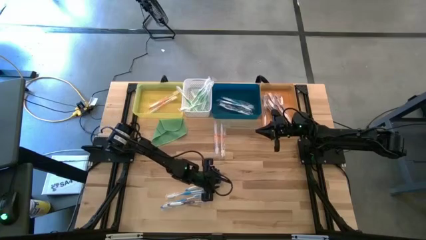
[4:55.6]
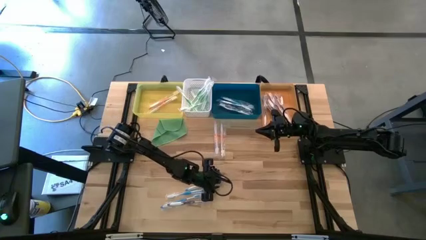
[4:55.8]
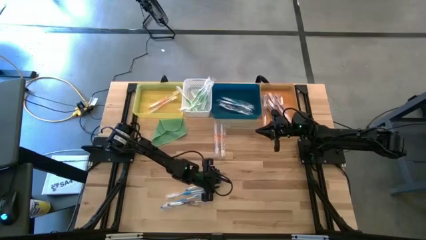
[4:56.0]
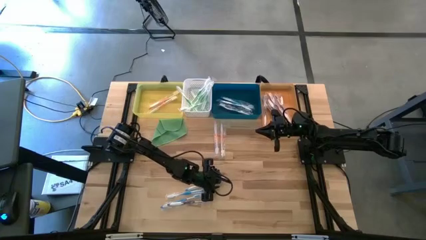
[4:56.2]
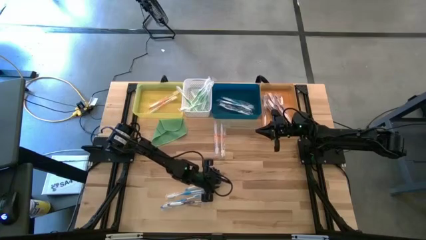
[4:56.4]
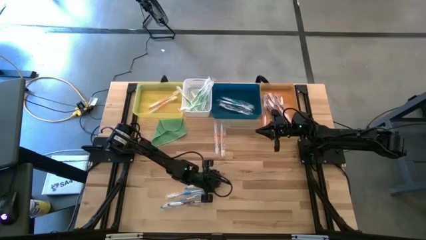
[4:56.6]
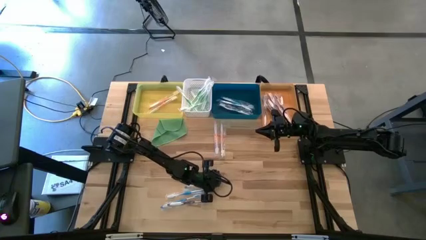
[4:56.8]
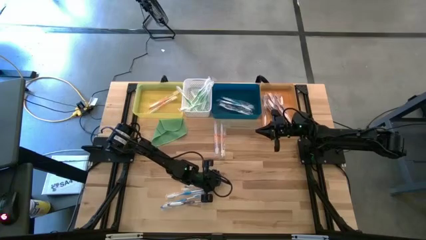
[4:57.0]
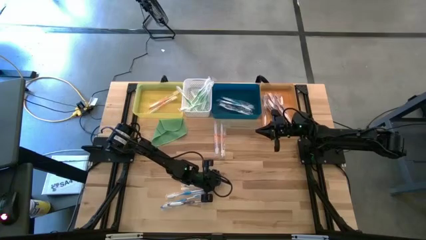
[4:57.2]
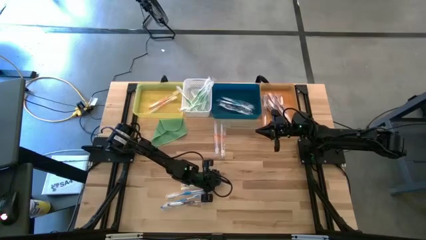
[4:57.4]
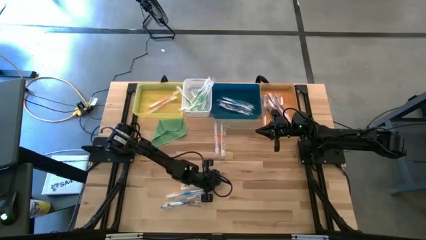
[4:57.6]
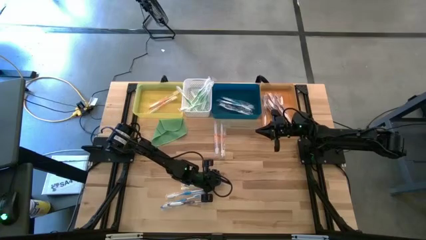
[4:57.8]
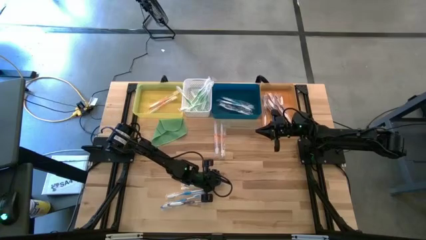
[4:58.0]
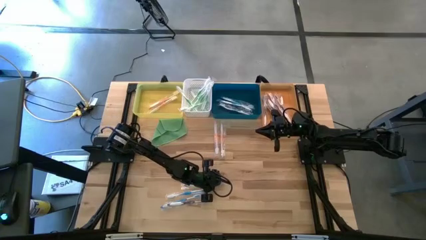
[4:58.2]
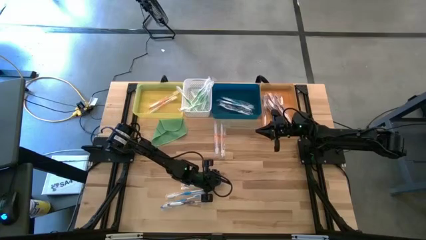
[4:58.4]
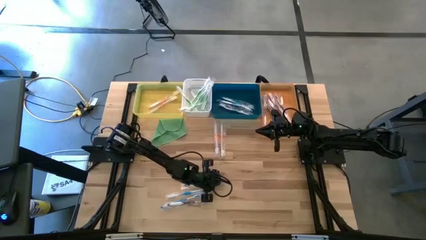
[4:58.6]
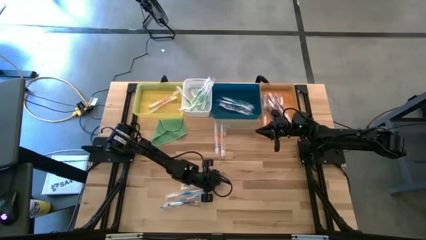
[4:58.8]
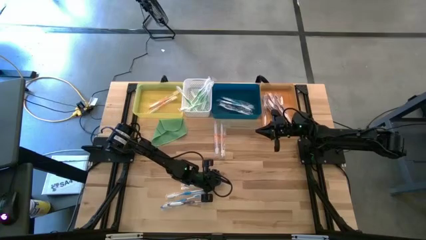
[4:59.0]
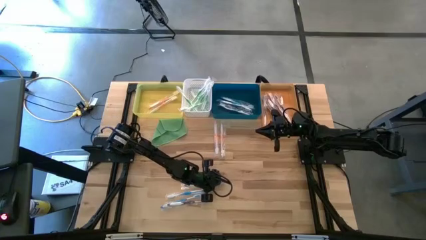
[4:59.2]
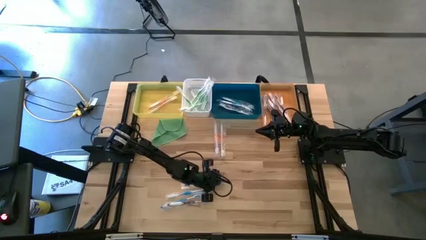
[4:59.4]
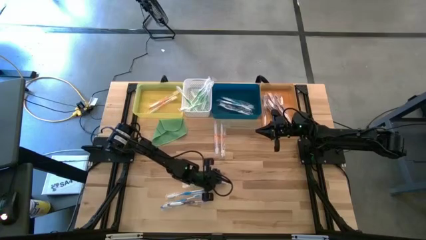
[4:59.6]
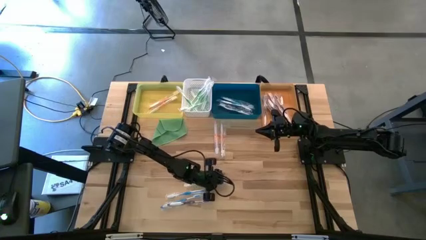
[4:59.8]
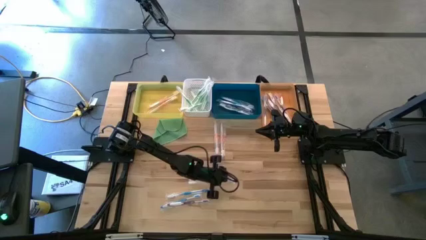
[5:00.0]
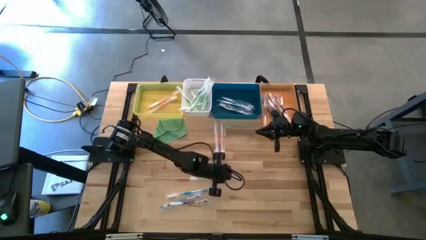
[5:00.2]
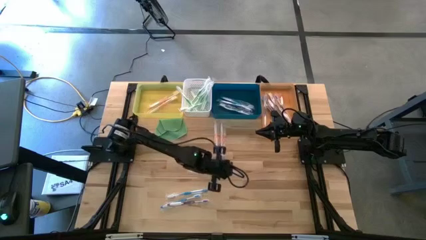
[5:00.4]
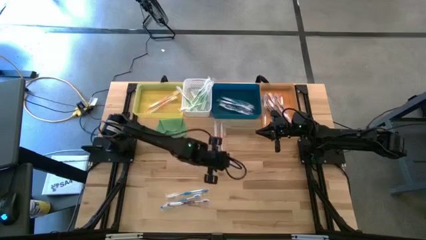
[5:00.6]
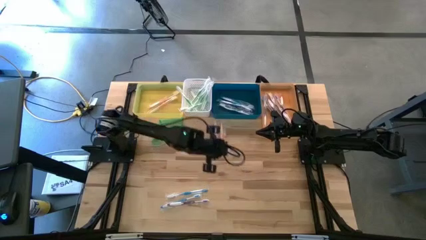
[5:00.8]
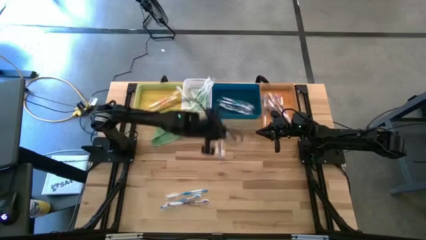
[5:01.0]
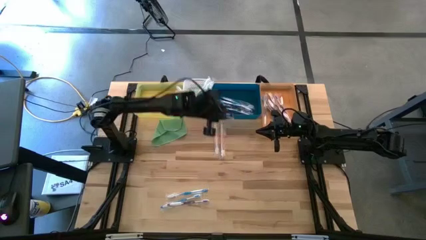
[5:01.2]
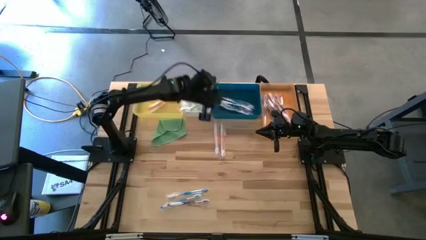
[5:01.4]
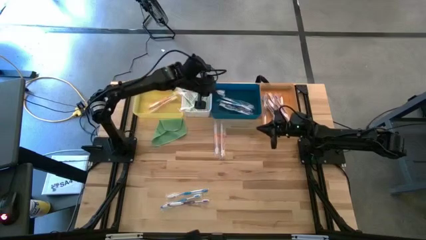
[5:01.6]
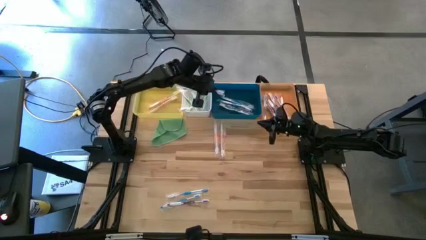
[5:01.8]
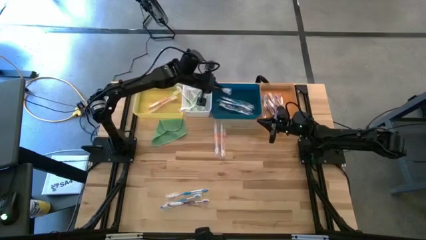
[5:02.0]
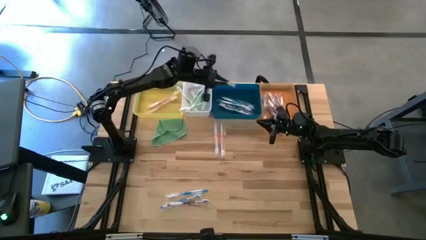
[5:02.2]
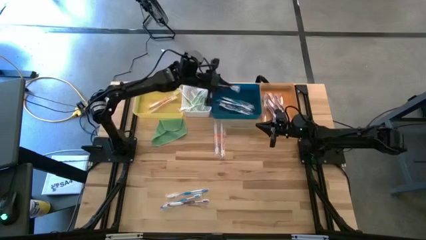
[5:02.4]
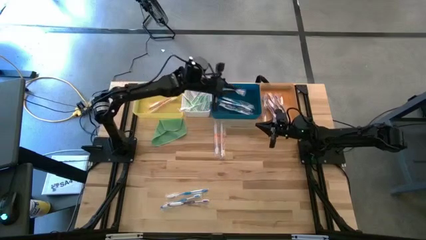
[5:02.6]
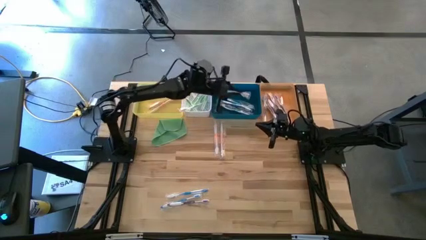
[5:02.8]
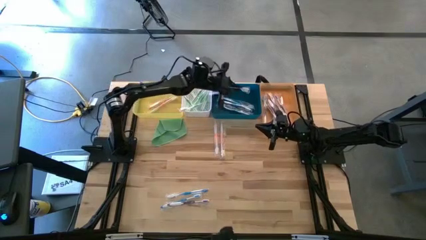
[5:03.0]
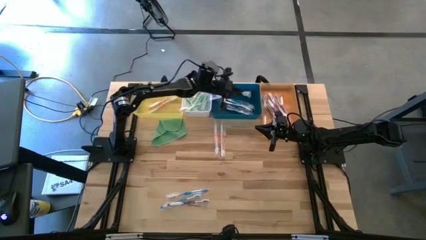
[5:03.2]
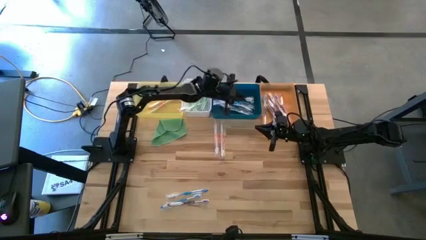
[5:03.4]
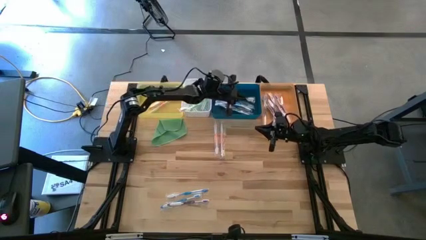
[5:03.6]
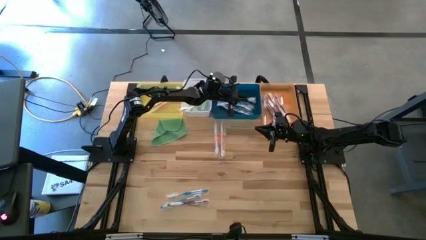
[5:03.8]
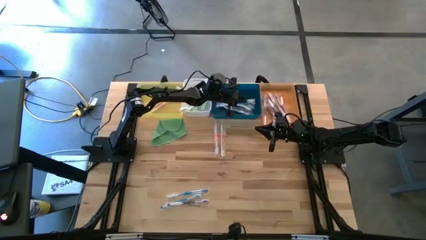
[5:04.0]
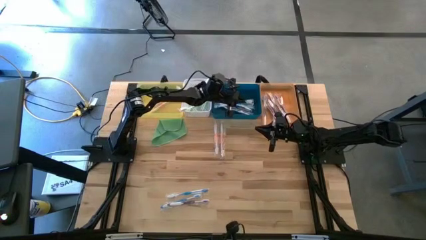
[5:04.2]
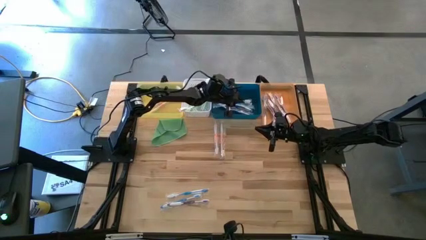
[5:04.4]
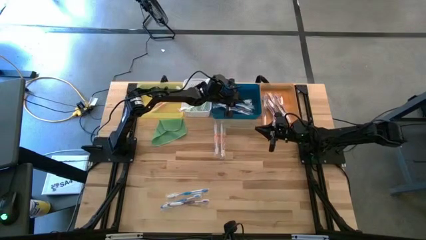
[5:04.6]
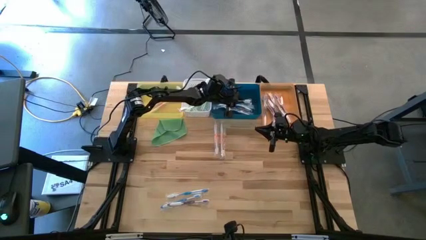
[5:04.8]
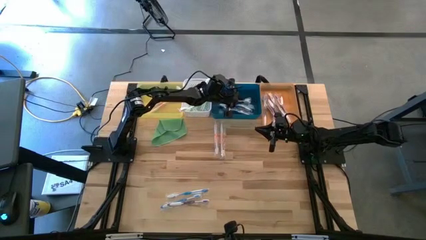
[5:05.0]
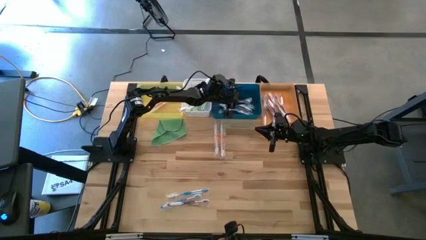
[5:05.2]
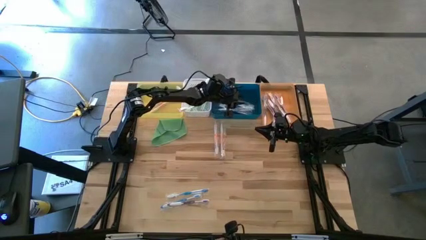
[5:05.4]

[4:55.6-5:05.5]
Task: Pick & Place Toothbrushes
Put the blue toothbrush into the blue bin

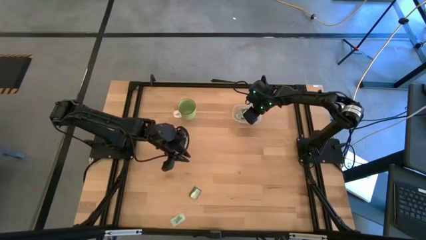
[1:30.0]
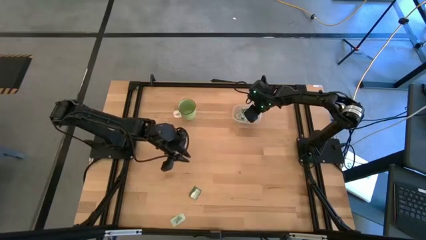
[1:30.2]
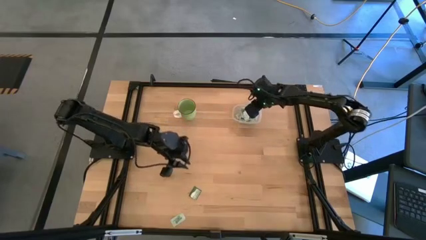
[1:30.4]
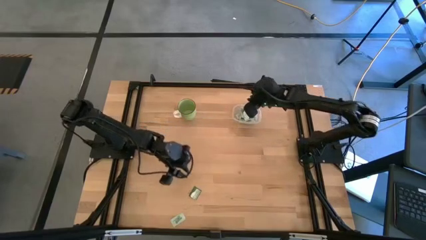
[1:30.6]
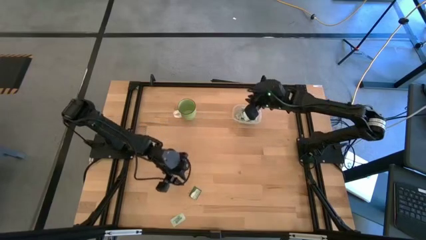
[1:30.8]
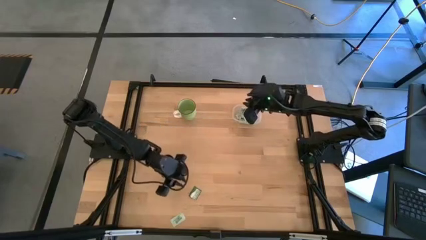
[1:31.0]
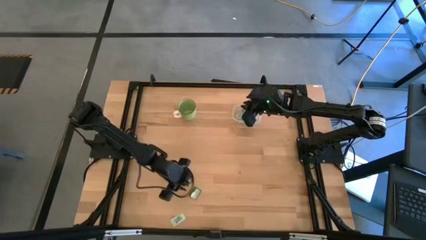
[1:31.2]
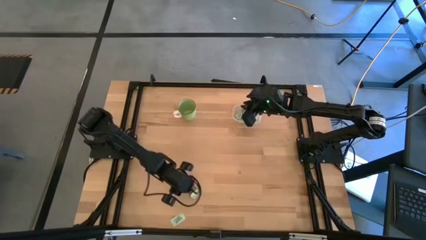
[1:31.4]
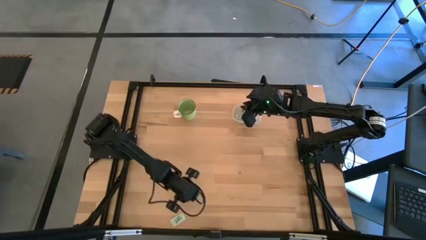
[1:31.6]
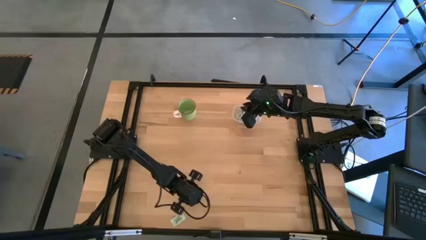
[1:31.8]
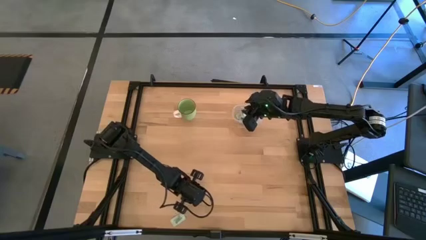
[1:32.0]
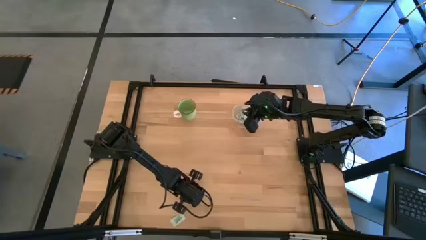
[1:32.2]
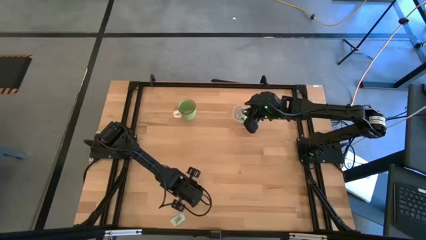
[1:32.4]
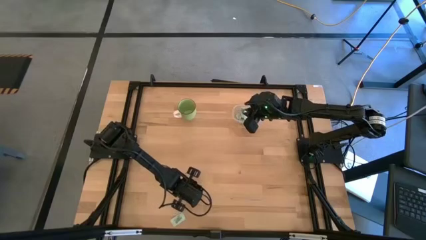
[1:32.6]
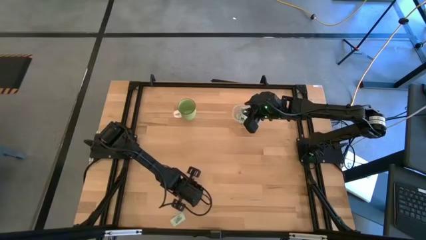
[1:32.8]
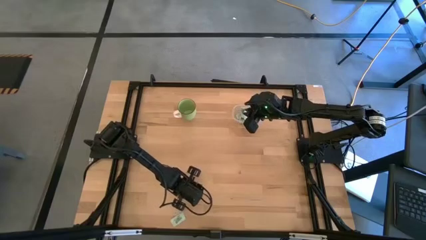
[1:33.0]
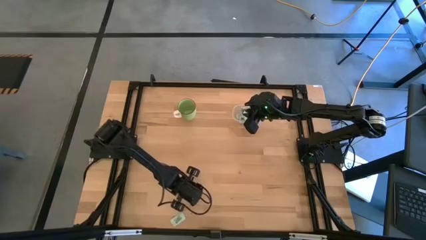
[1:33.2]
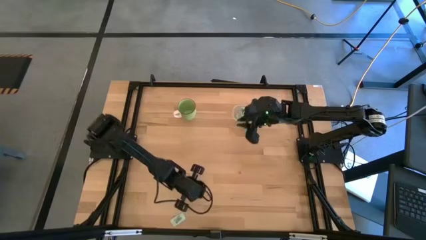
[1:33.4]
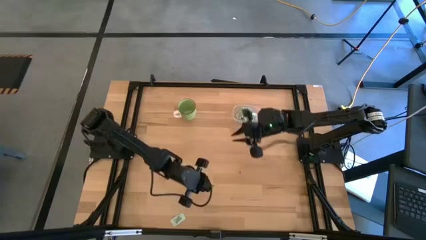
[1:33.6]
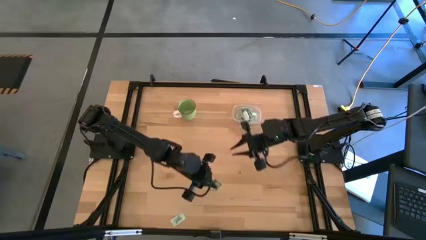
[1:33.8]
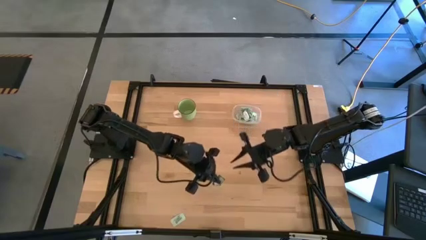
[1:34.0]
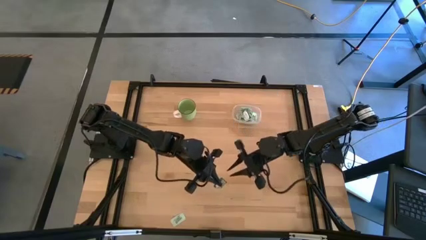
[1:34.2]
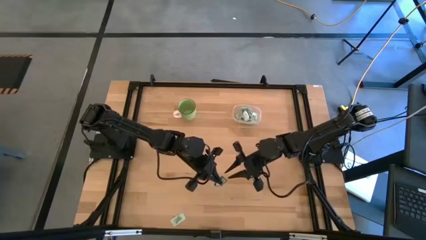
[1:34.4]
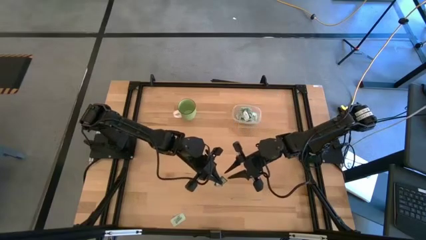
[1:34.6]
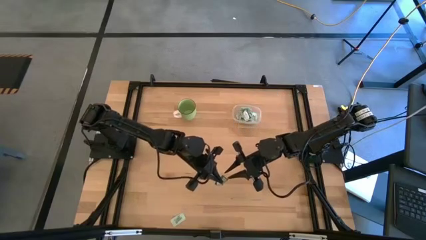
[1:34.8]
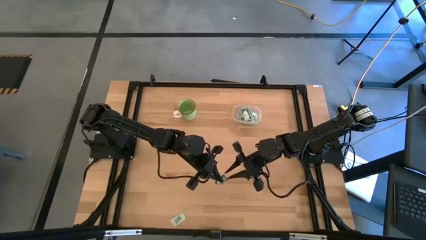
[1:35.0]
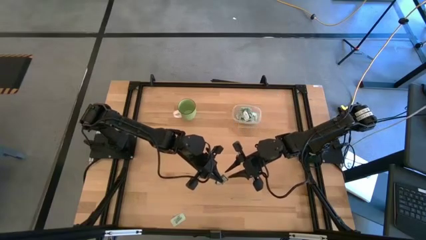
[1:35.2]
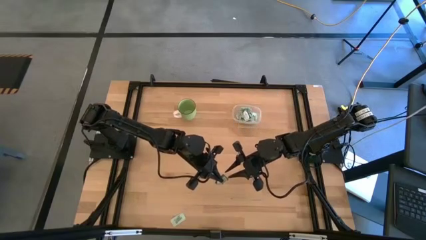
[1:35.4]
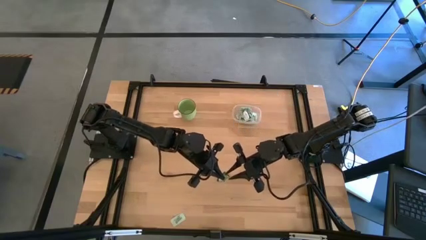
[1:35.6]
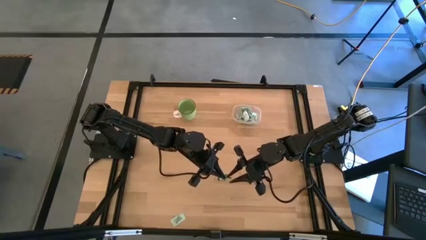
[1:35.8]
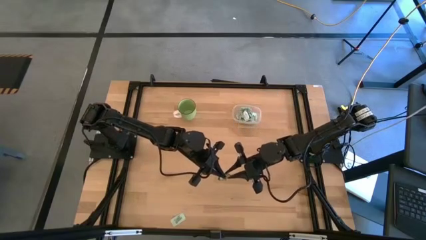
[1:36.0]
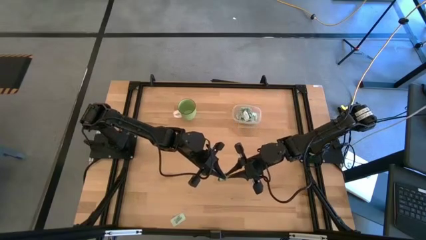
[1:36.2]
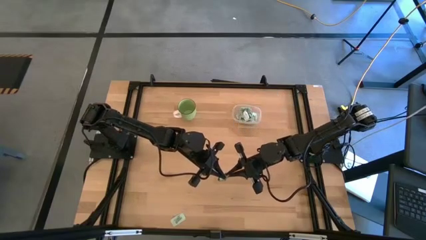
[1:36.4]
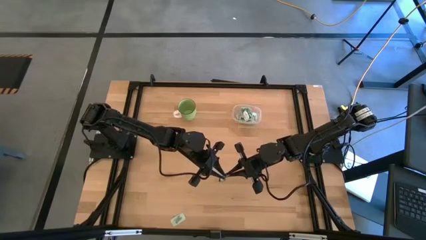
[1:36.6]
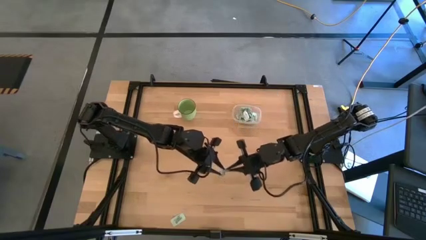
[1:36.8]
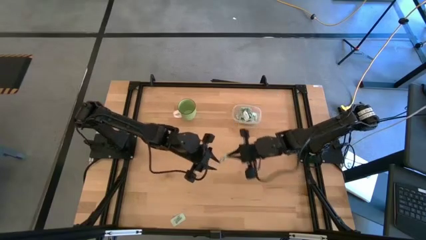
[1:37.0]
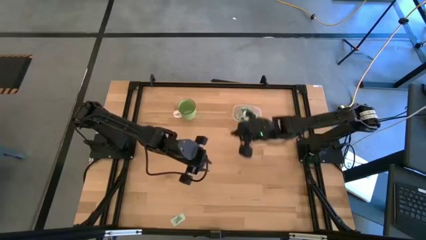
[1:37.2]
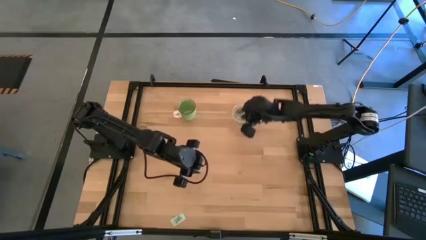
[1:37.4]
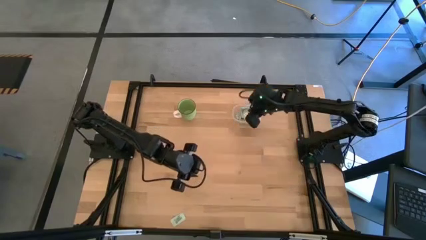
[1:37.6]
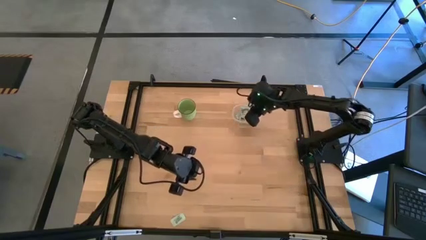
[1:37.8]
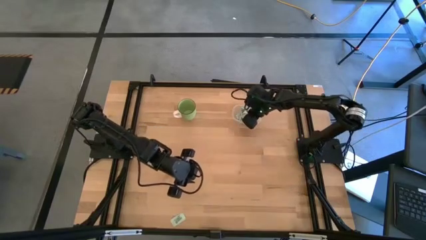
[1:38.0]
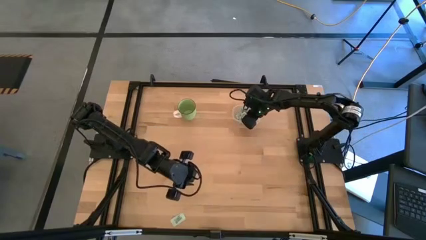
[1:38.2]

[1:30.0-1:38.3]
Task: Pick and place items into bin
Put the green truvia packet into the transparent bin
